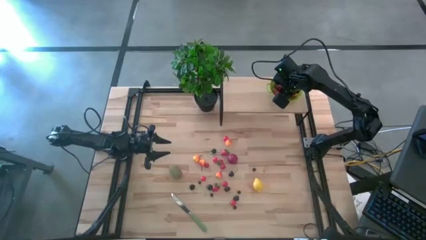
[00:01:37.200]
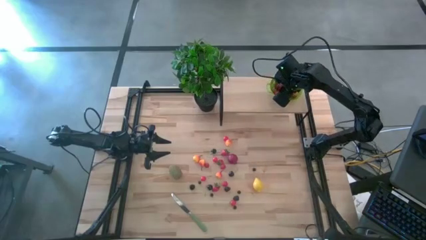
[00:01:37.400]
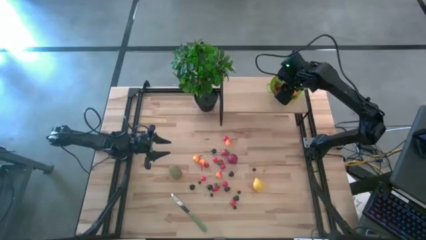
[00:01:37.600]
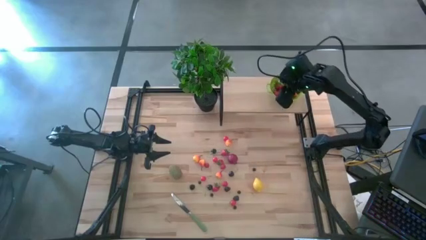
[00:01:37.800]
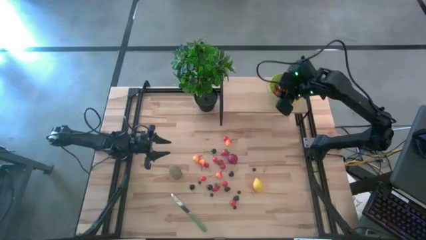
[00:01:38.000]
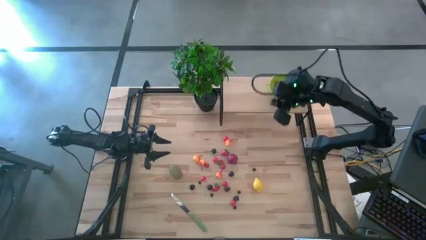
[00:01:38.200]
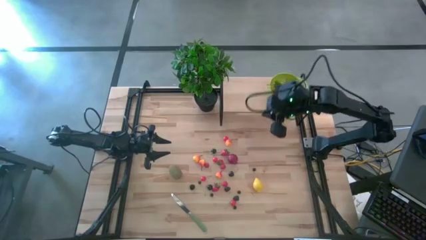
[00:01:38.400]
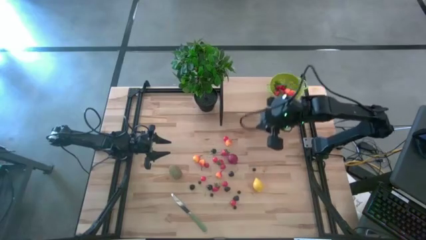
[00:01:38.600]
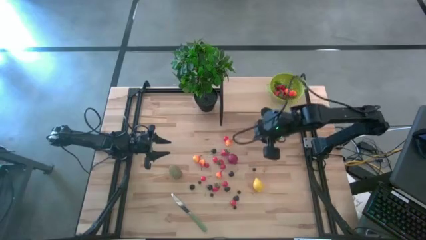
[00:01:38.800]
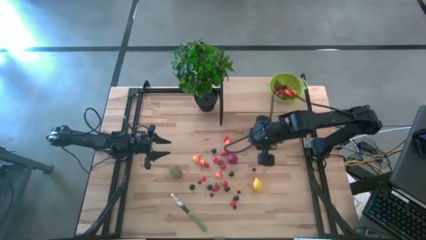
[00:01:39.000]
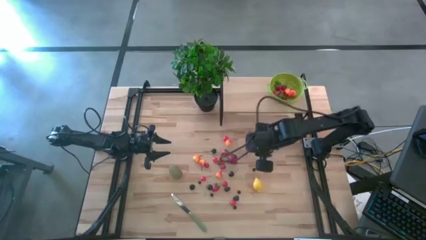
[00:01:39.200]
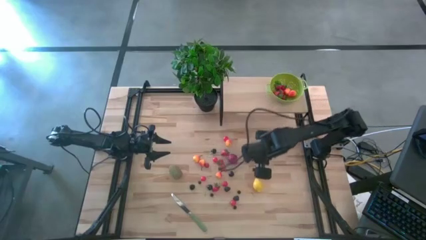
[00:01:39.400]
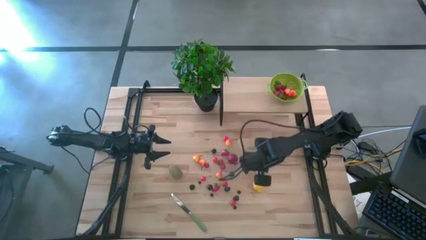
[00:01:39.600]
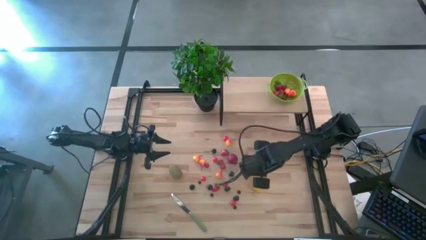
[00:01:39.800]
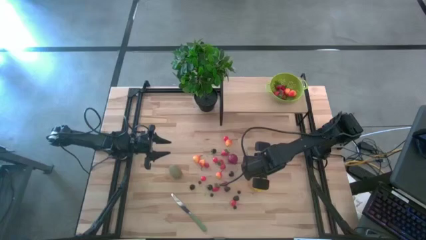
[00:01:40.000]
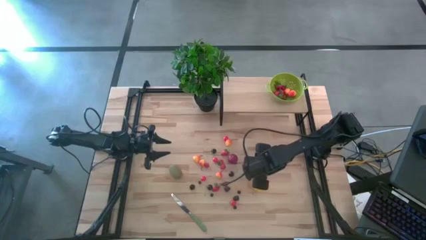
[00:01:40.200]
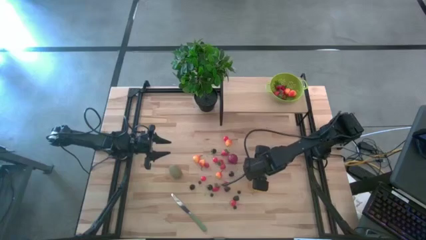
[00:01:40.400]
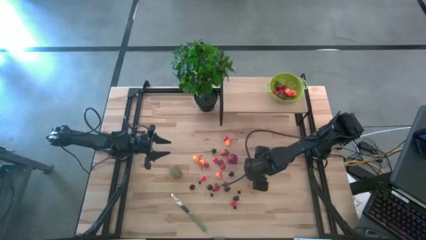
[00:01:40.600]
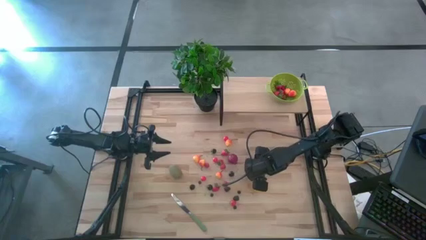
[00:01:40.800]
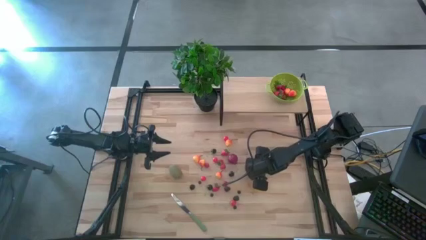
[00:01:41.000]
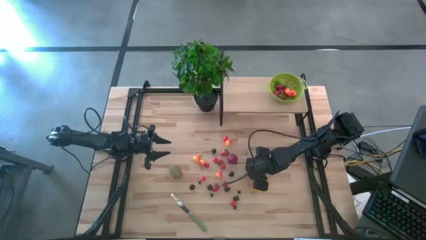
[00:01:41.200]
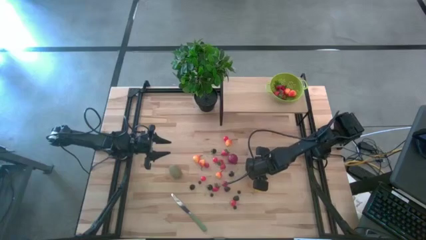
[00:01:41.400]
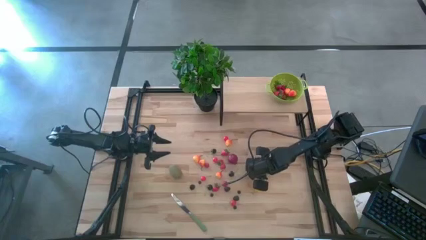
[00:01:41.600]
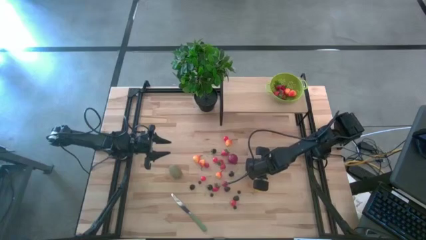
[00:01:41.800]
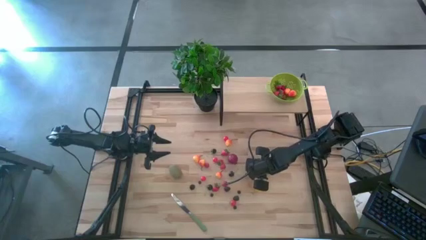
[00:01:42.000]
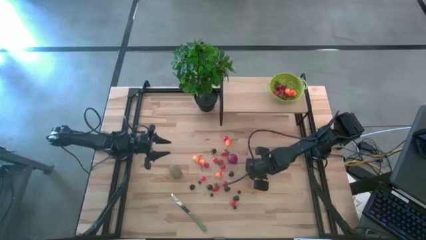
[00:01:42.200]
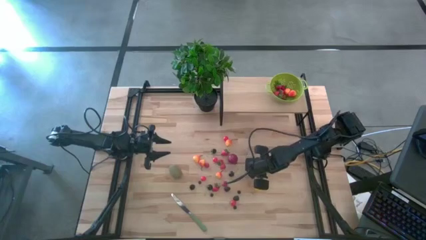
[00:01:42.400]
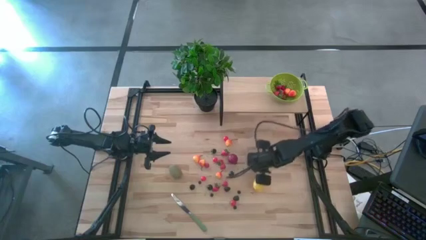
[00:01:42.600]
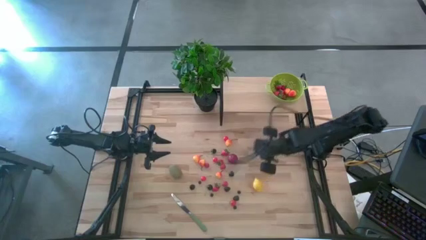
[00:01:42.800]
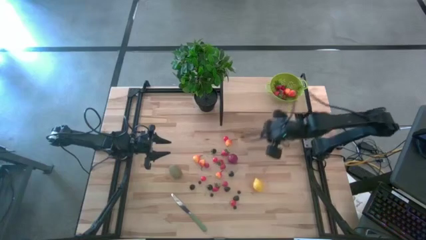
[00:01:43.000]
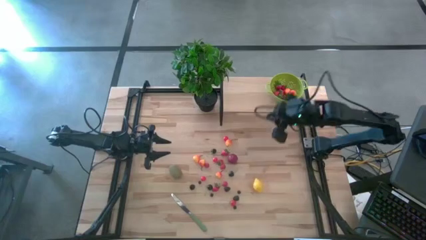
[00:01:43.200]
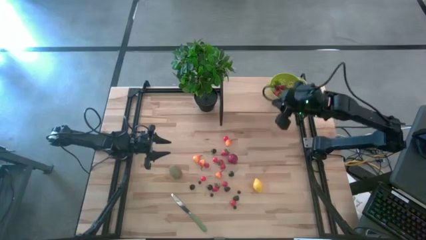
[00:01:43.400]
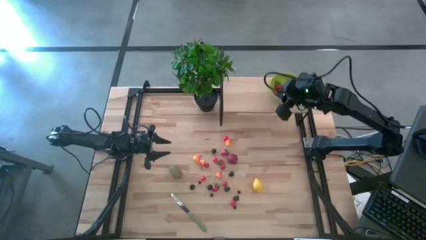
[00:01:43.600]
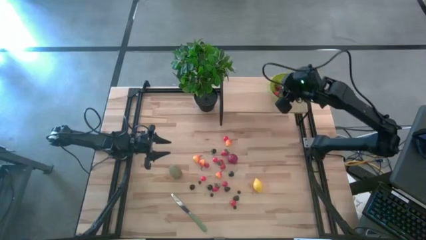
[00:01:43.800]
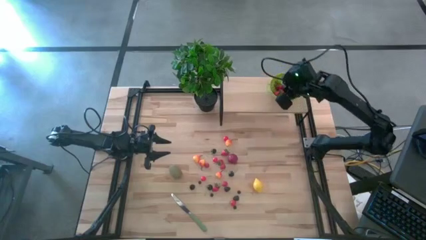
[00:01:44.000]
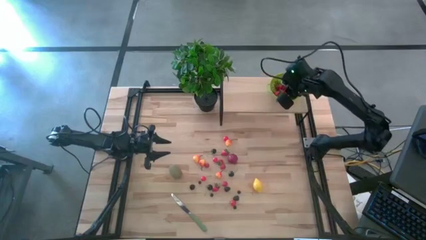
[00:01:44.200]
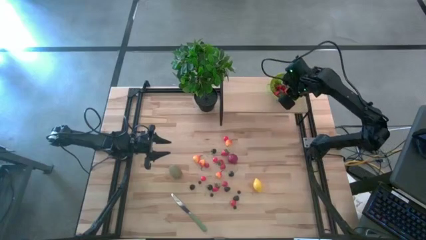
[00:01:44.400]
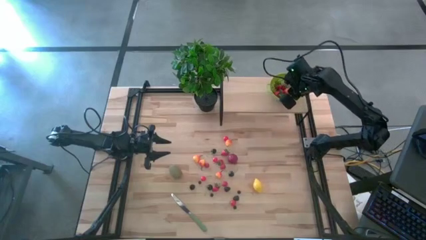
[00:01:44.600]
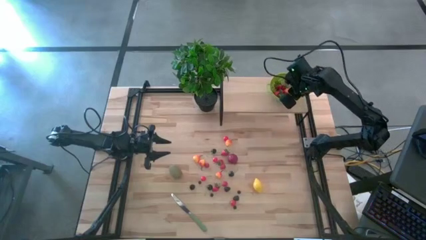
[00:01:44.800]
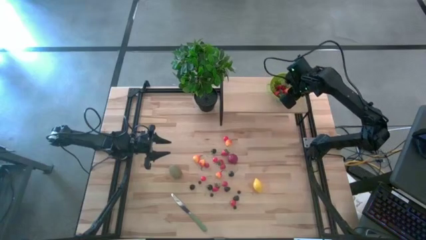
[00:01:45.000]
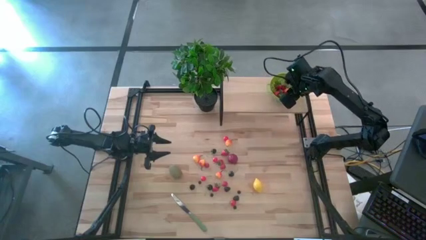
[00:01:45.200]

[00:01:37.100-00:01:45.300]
Task: Pick & Place Fruit
Put the blueberry into the green strainer bowl on the shelf

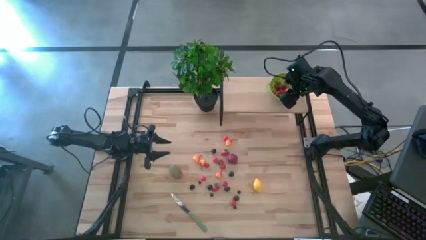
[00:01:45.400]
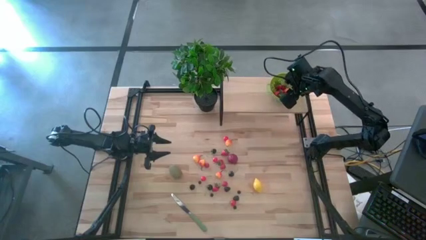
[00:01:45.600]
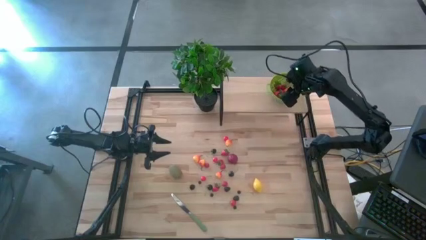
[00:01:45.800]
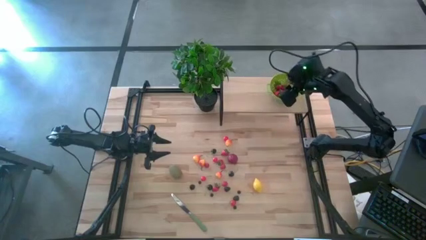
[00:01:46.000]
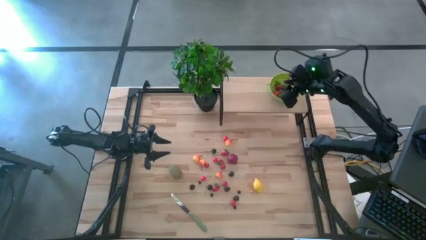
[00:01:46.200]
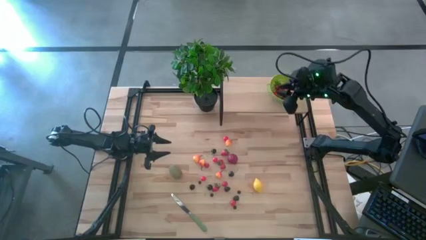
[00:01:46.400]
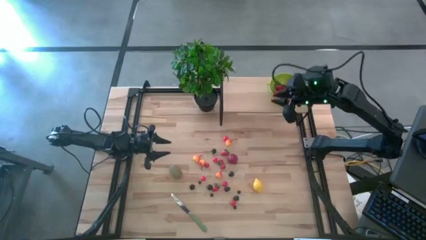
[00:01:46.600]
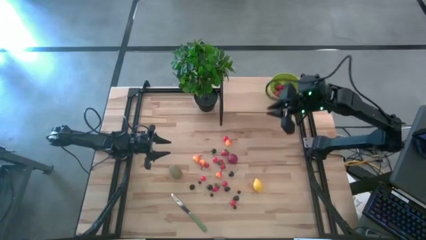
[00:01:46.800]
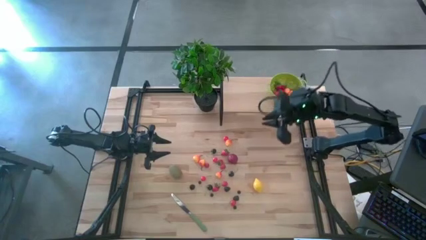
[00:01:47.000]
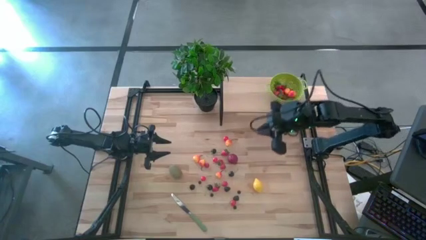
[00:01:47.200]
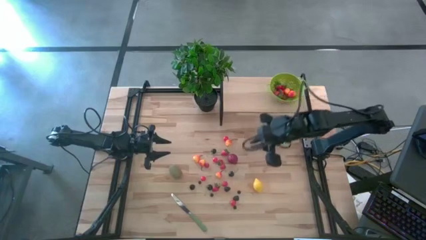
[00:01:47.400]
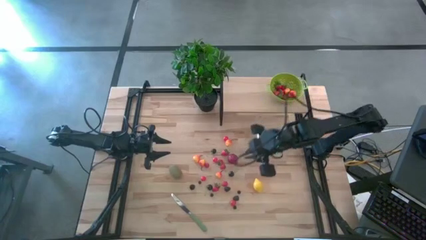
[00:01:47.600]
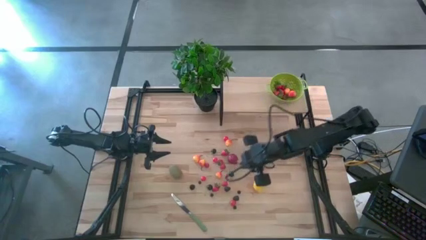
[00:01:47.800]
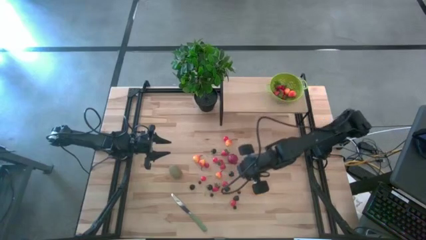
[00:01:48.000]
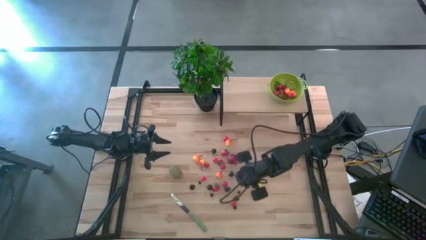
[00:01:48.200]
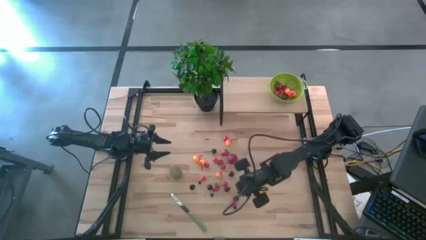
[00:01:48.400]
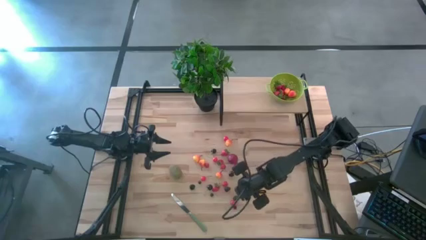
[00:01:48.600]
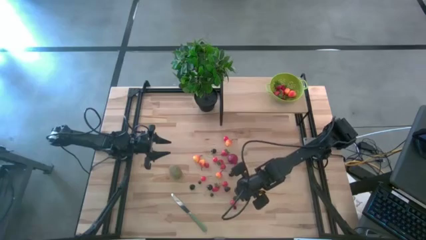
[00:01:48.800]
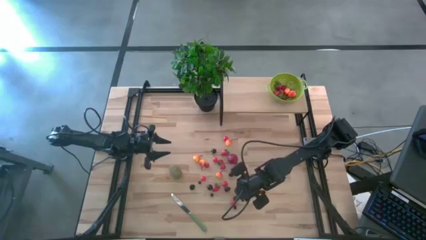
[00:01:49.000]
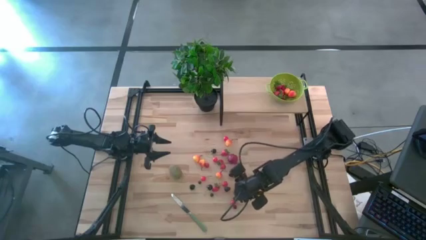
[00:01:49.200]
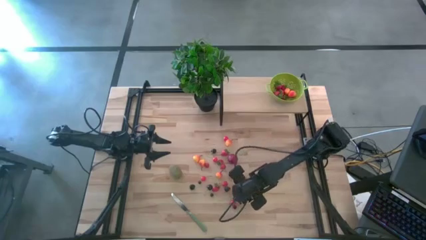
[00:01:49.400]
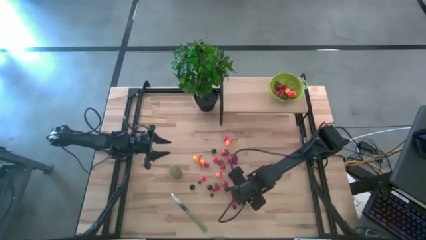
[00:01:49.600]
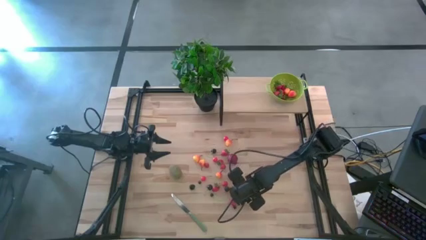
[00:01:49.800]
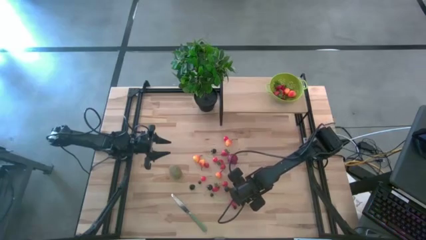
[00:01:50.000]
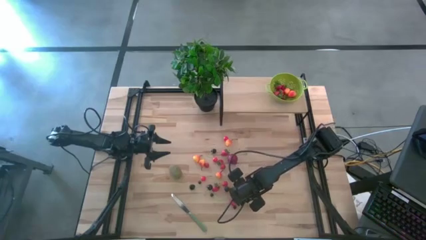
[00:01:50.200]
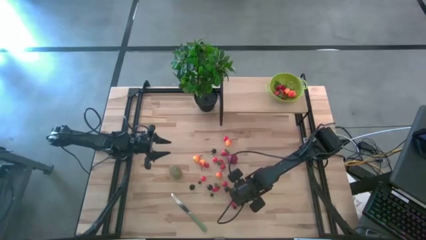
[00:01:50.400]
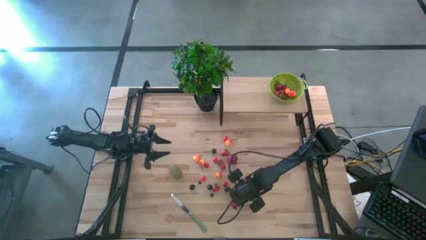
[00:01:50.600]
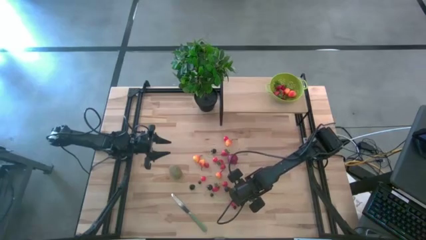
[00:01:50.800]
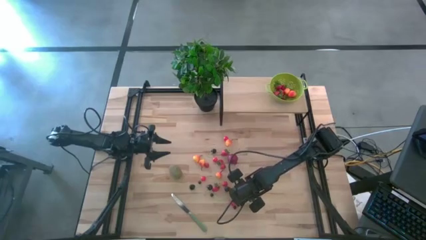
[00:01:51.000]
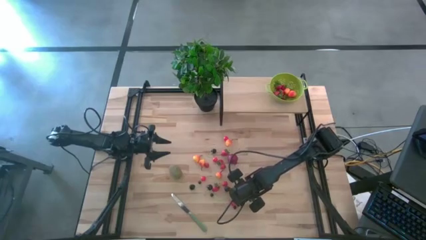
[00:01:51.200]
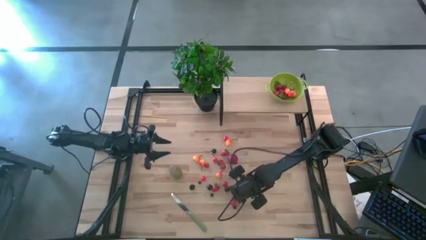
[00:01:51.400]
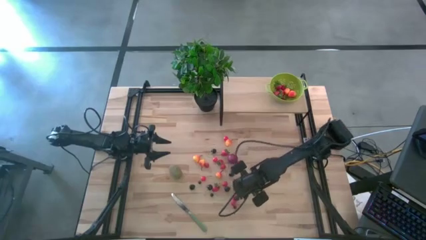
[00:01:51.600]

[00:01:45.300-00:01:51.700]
Put the blueberry into the green strainer bowl on the shelf
